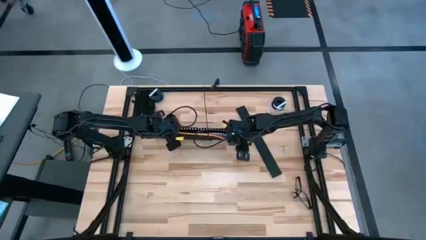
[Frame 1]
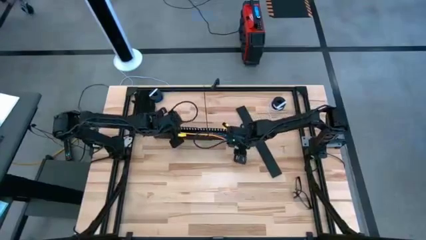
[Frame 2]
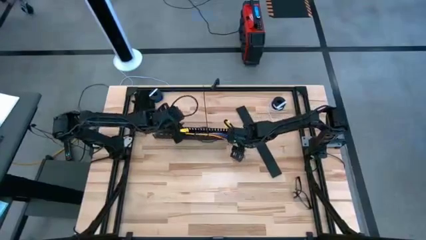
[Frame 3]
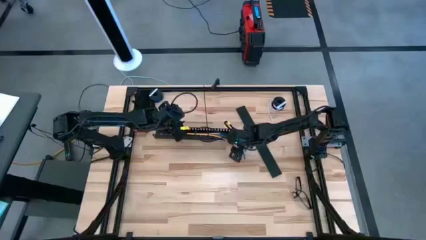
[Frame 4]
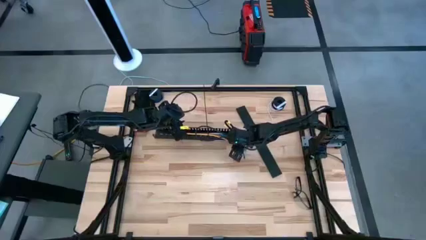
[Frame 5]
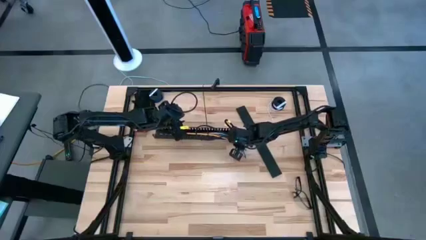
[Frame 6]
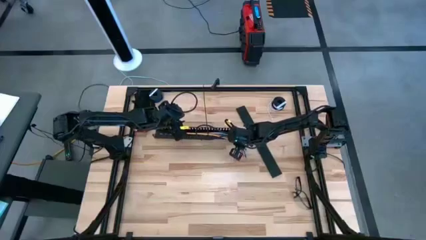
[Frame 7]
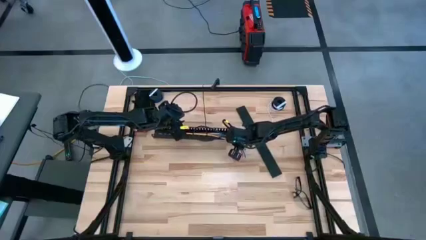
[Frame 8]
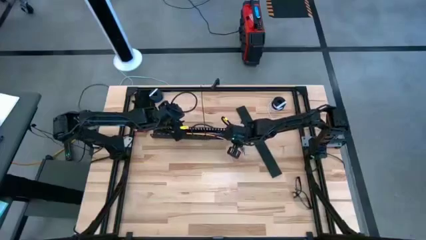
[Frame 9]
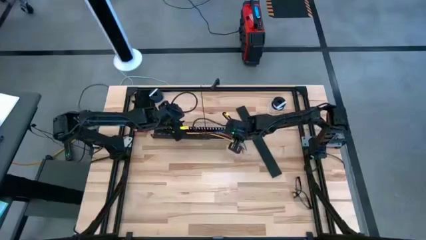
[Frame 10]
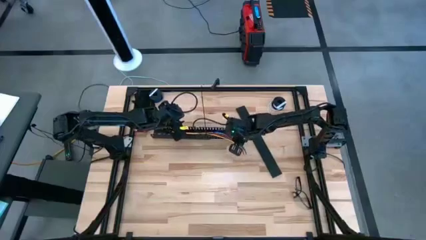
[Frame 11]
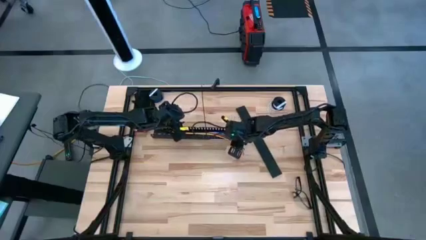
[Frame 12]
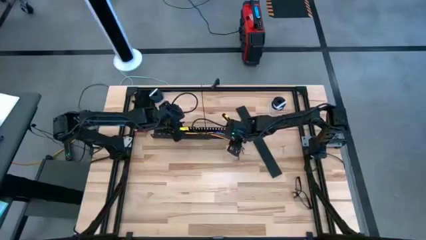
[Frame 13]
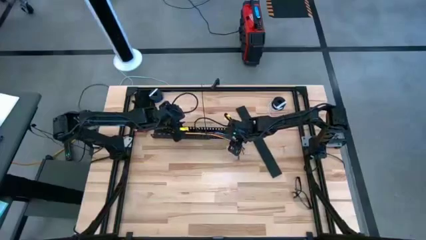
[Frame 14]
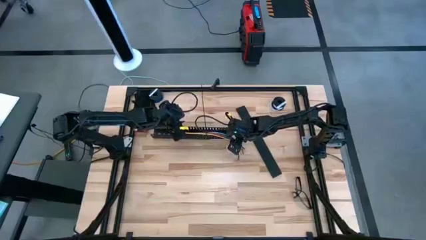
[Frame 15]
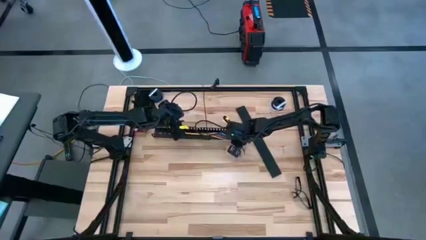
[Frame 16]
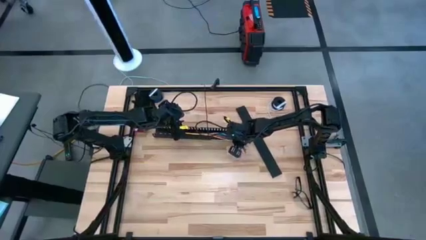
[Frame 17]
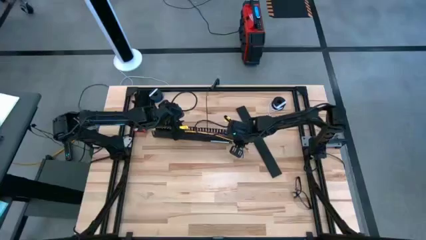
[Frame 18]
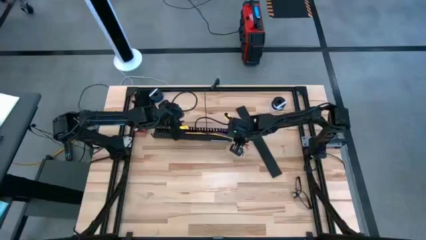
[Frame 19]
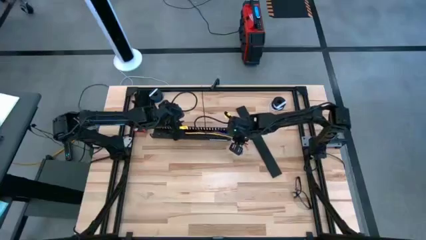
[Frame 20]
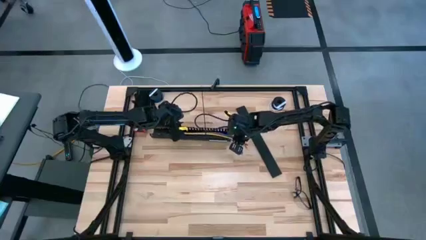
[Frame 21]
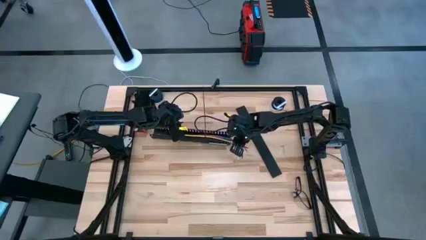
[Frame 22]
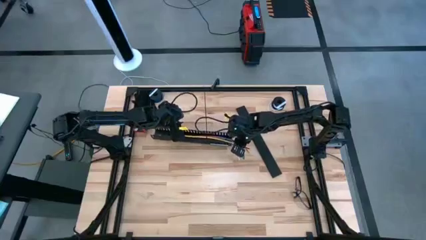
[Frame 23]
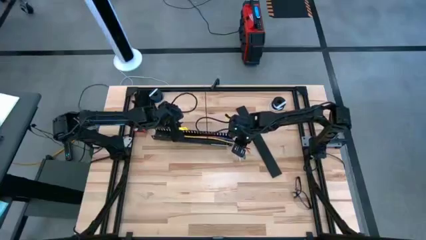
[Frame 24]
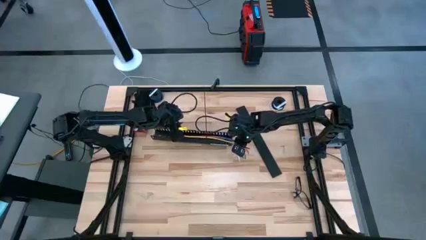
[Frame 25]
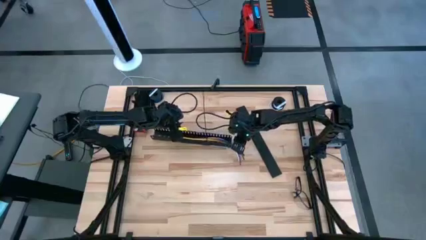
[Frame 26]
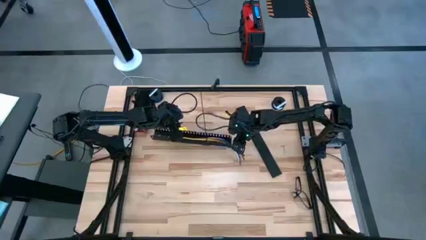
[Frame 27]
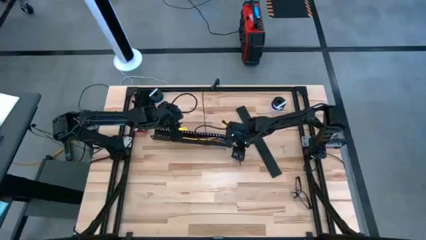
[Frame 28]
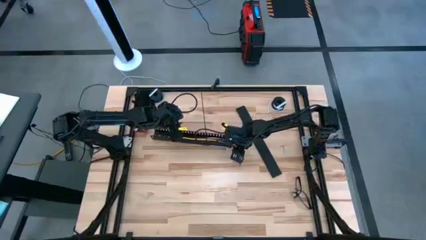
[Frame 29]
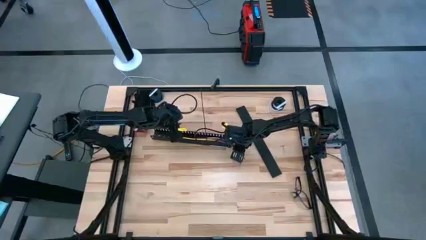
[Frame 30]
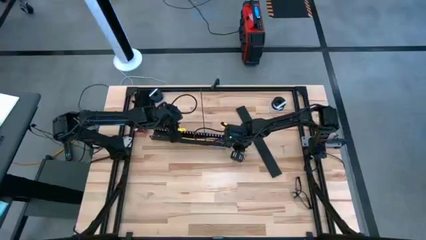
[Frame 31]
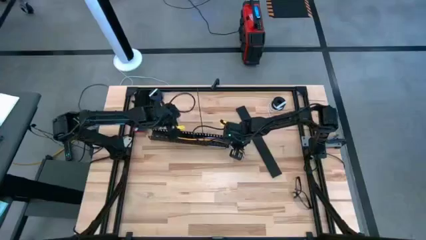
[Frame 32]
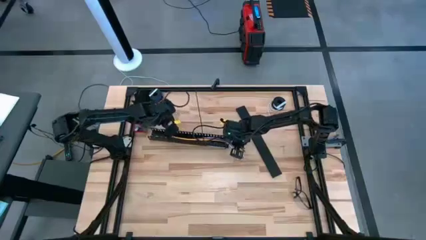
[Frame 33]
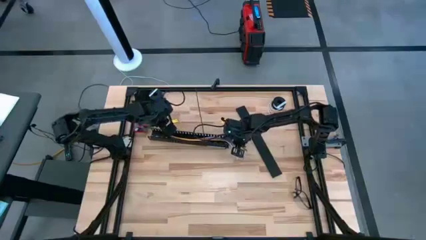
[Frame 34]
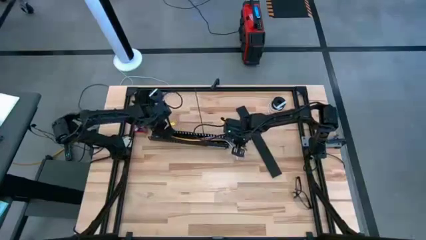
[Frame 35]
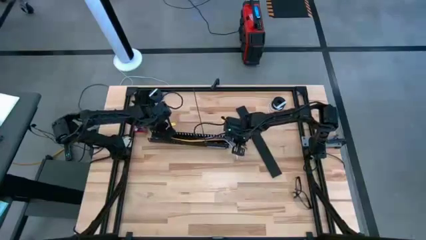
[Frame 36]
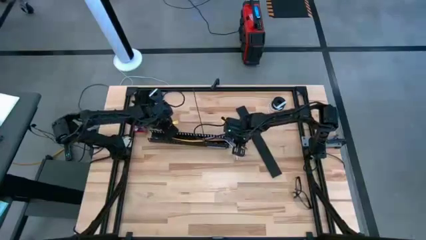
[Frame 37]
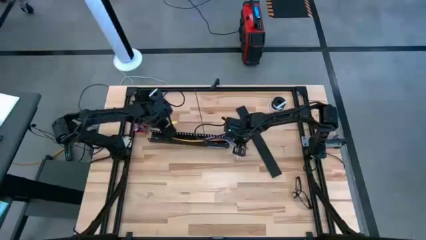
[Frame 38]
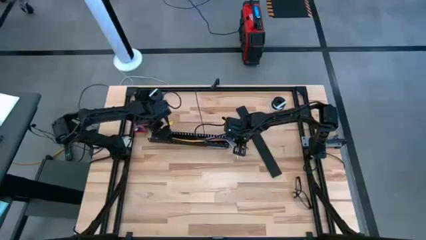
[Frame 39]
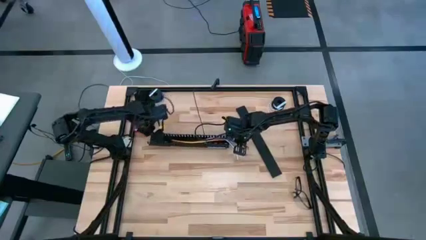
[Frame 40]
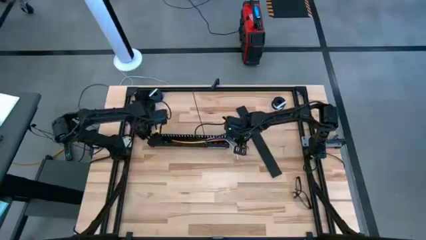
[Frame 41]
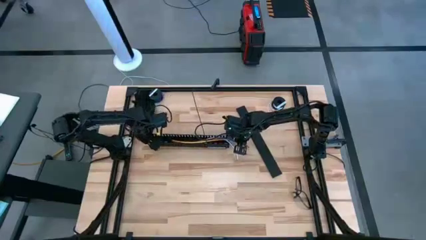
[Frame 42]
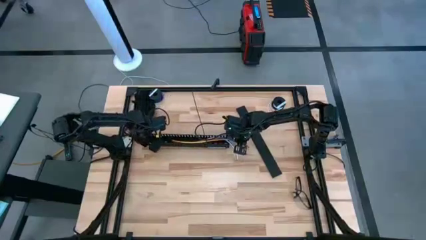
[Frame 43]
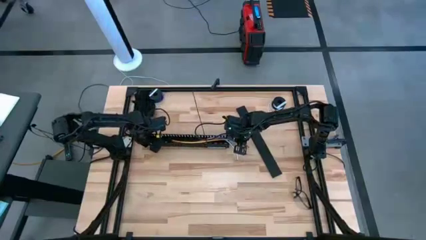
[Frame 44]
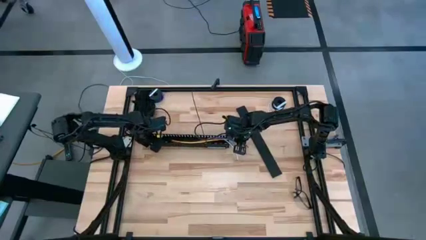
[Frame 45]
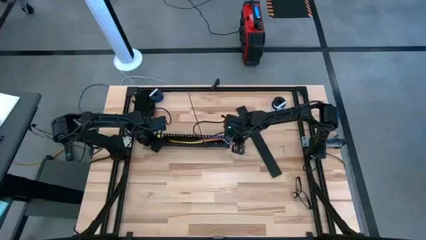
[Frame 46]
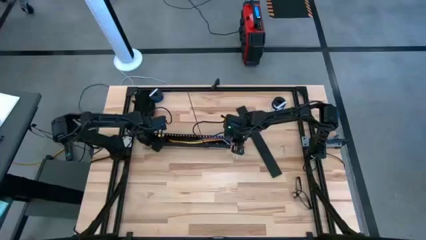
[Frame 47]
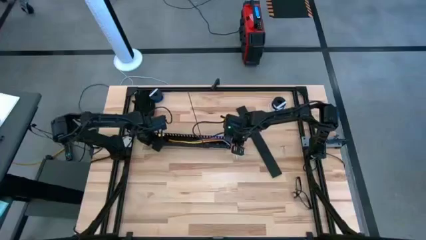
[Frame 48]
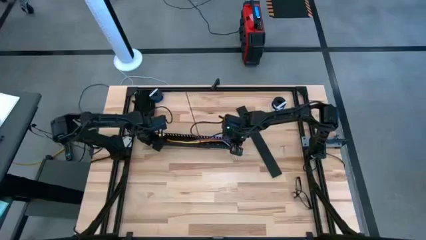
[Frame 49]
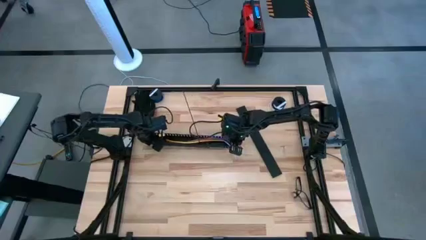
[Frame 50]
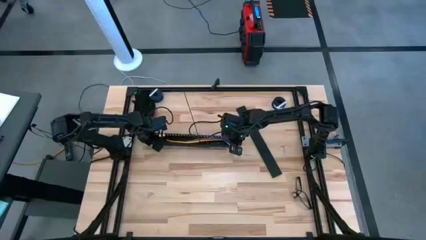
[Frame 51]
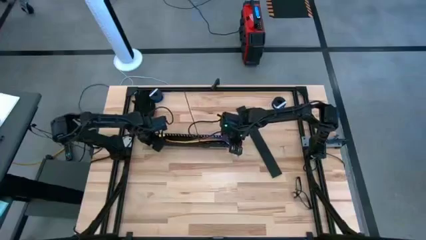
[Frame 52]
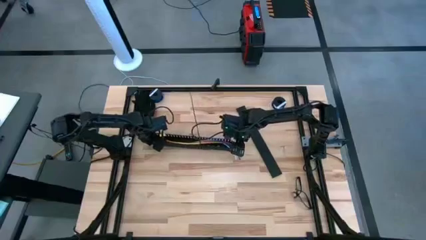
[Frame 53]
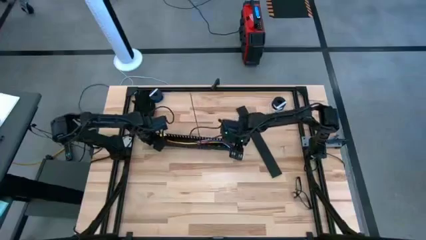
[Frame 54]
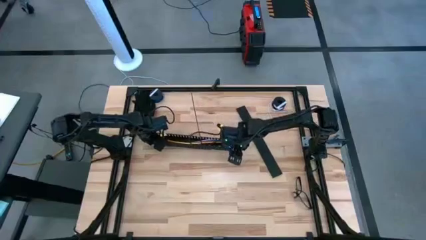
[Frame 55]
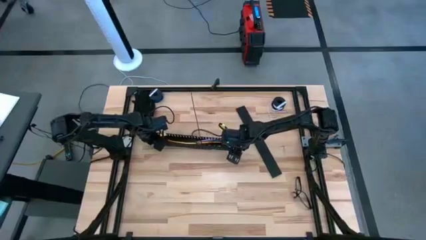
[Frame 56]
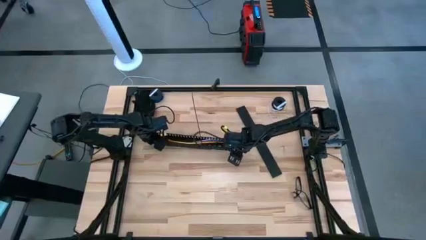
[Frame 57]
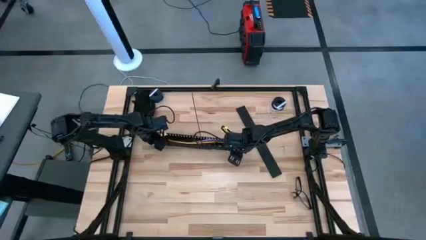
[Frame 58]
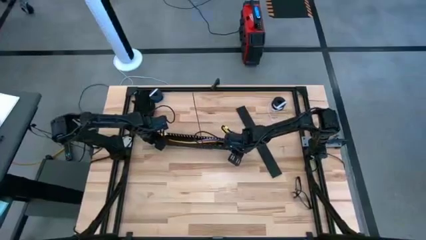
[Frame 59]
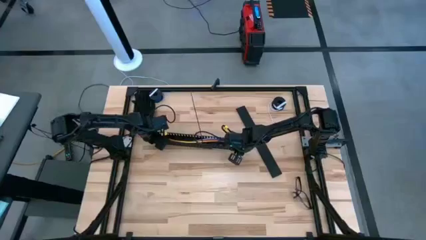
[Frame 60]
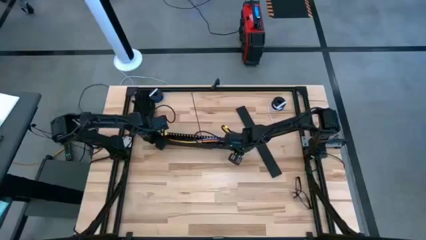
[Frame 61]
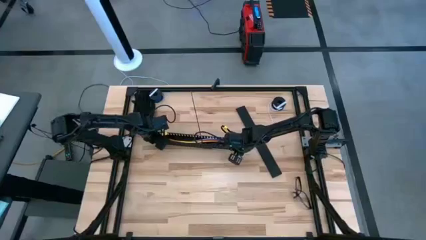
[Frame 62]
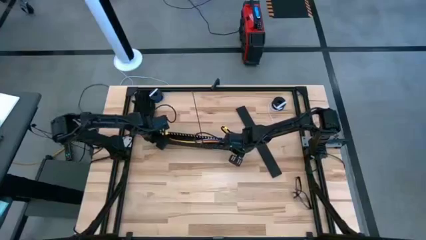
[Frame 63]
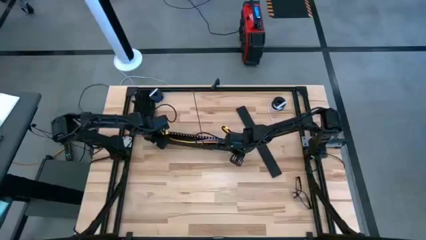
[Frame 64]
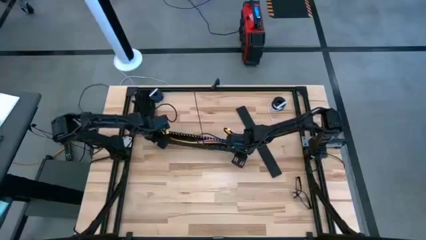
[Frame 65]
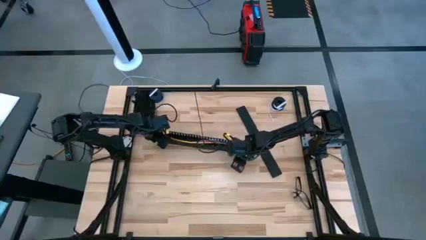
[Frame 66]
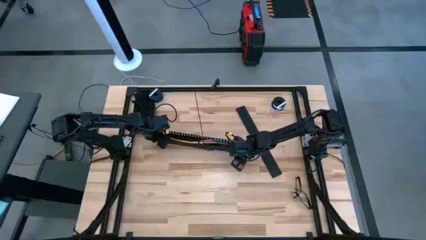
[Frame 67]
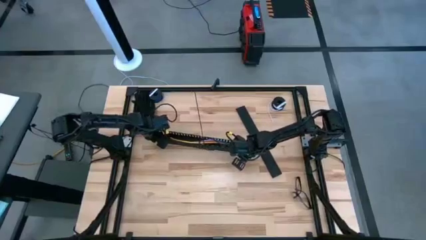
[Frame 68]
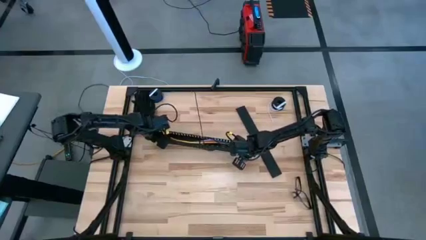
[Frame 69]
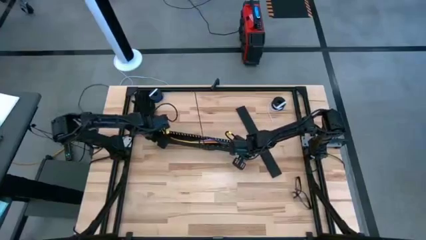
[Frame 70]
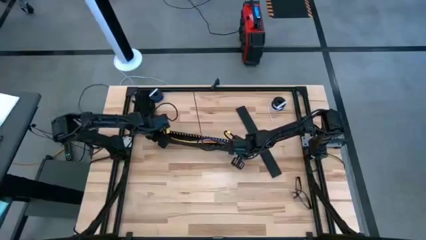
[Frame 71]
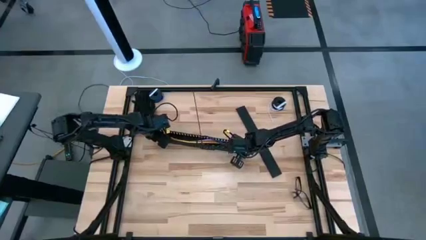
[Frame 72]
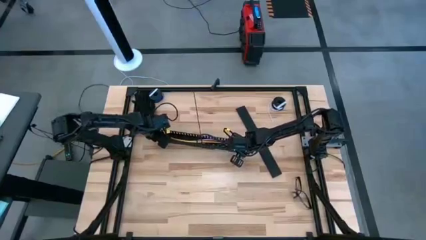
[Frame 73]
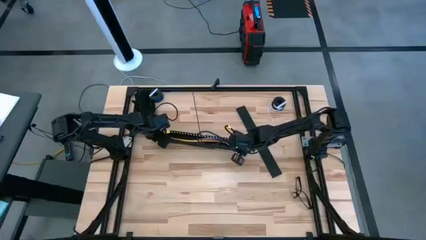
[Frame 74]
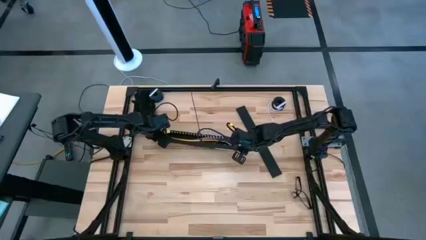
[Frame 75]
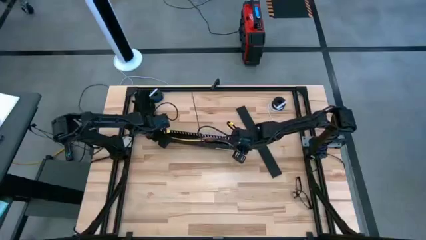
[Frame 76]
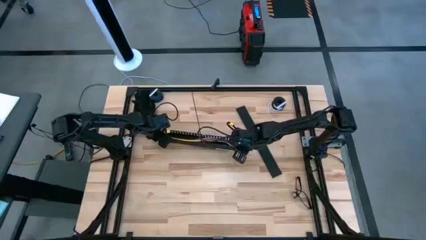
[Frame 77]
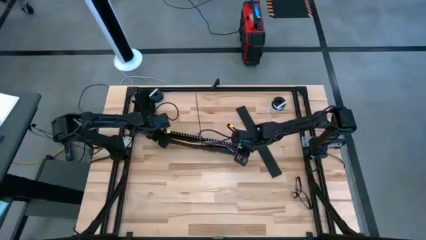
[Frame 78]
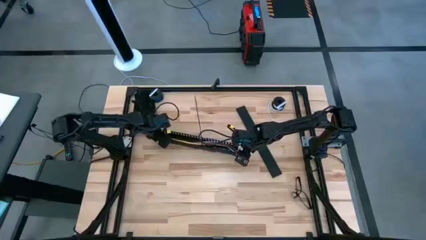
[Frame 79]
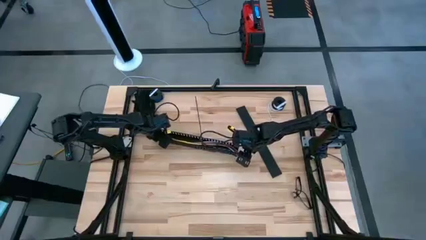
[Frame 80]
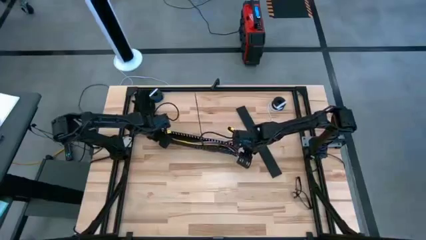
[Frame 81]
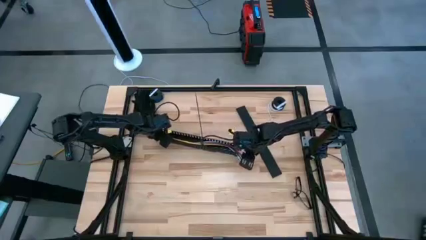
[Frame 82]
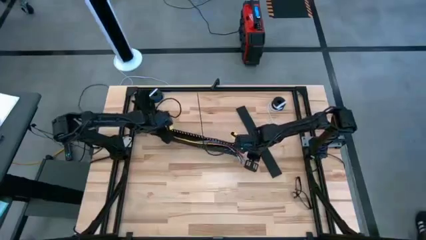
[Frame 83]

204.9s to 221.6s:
Task: Ziptie cables
Put the zip tied cable into the black cable duct
